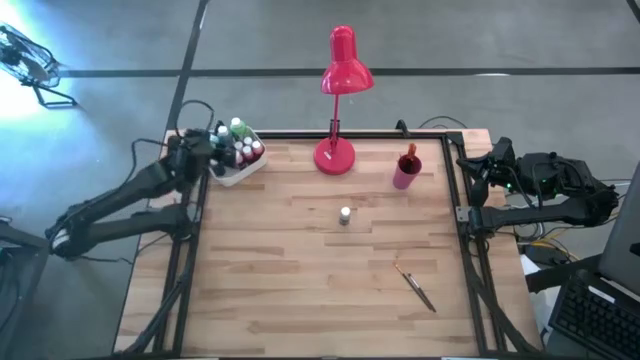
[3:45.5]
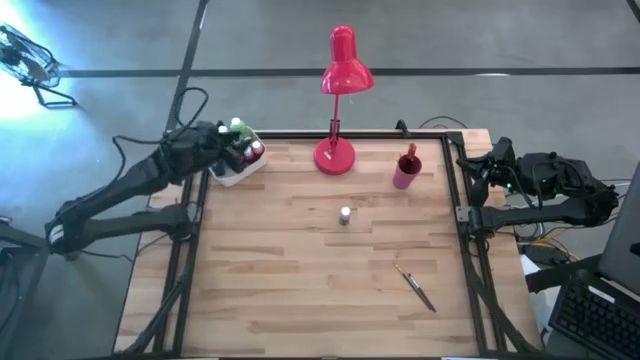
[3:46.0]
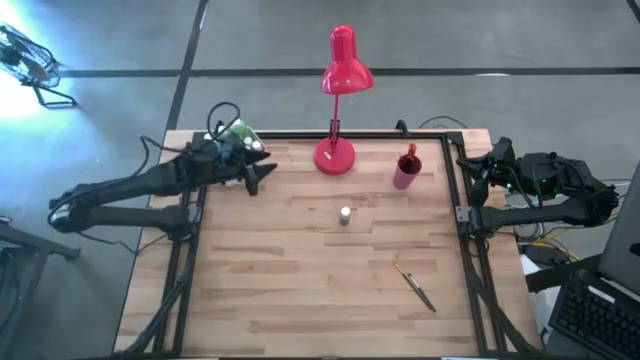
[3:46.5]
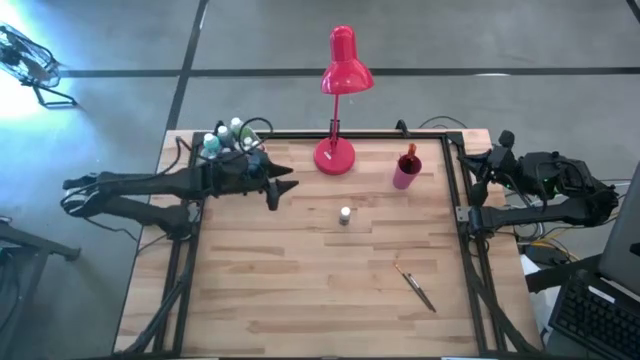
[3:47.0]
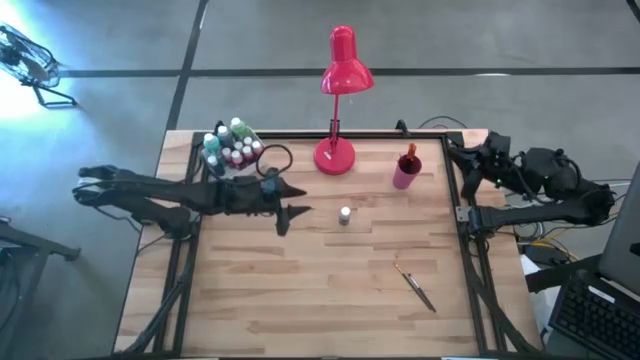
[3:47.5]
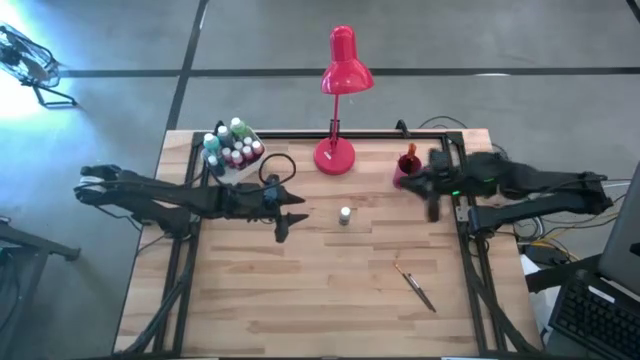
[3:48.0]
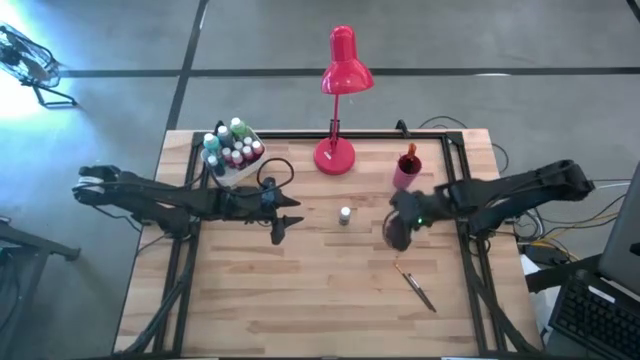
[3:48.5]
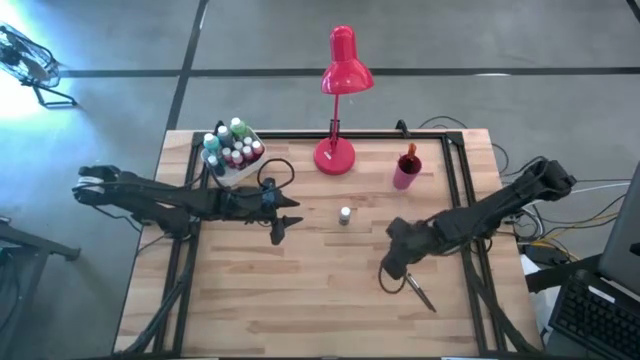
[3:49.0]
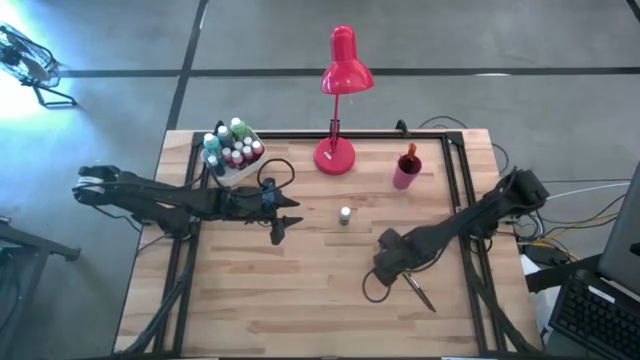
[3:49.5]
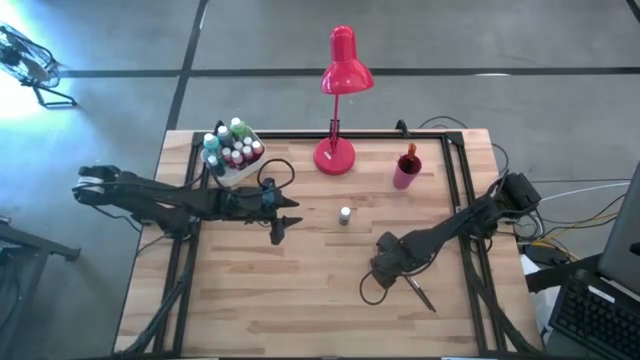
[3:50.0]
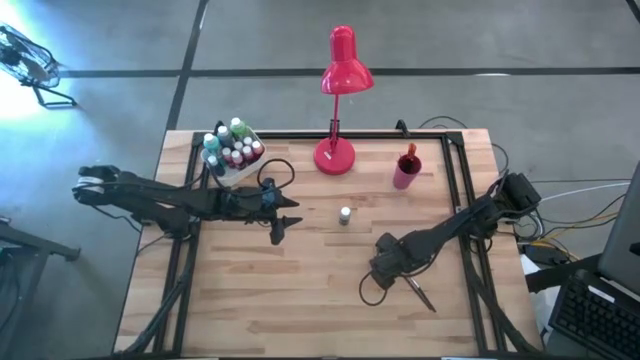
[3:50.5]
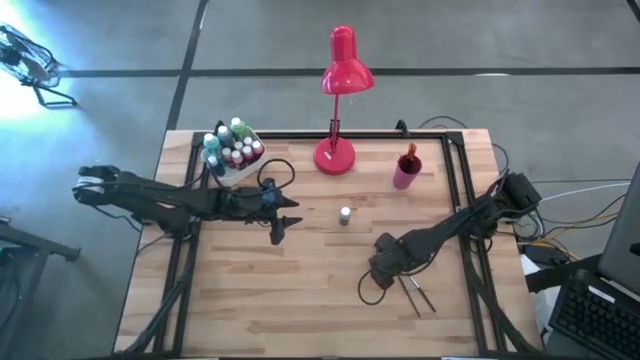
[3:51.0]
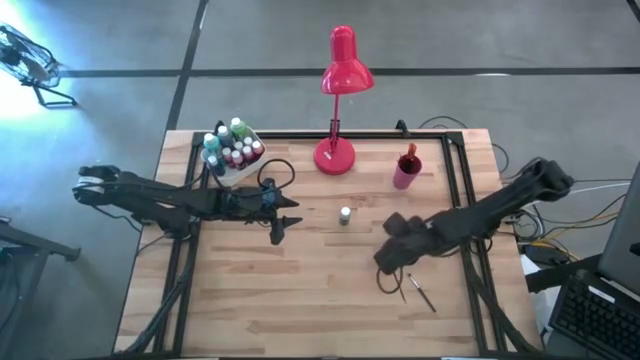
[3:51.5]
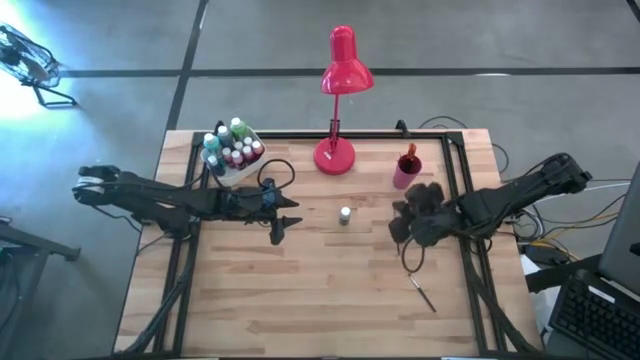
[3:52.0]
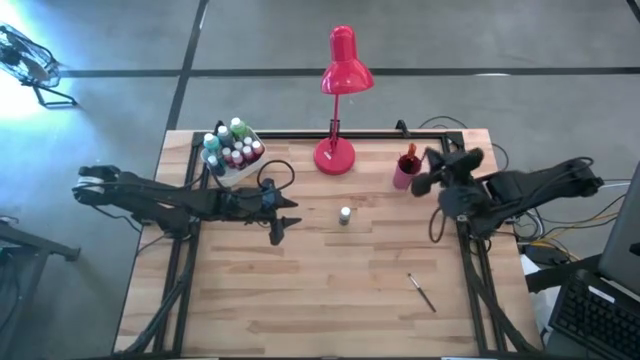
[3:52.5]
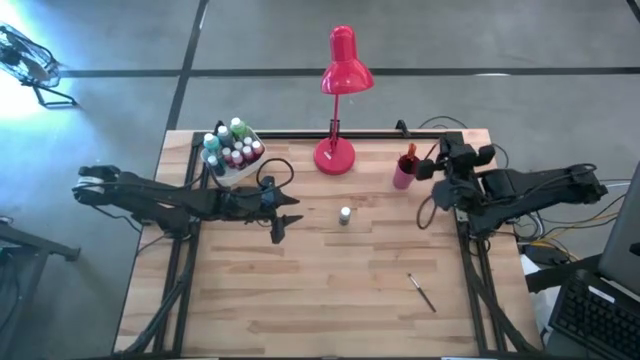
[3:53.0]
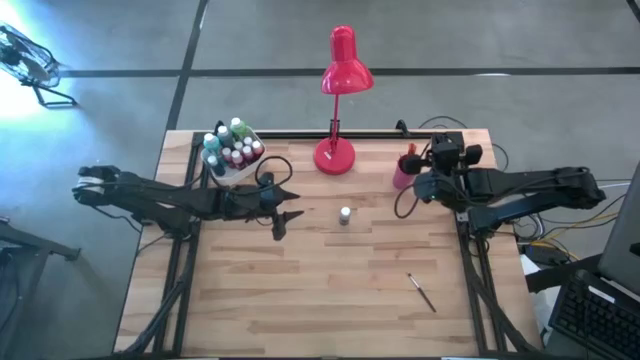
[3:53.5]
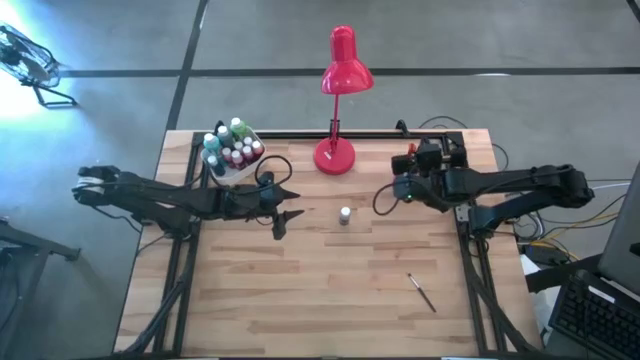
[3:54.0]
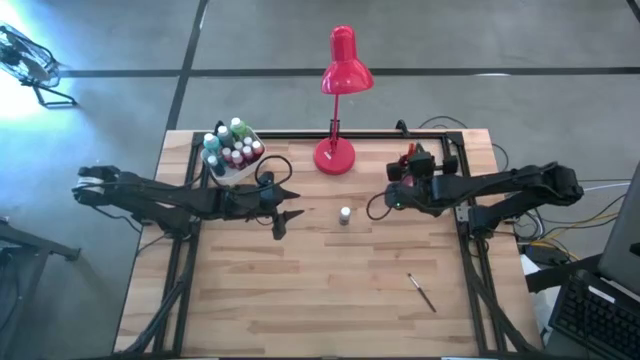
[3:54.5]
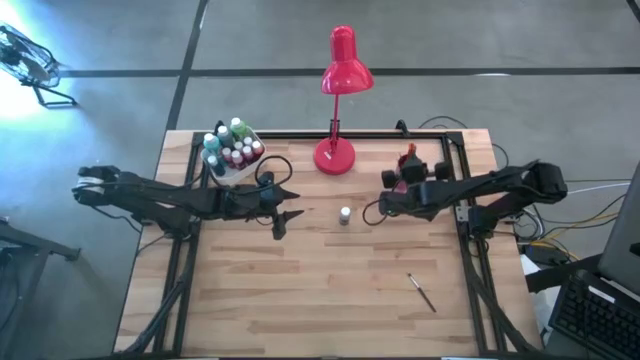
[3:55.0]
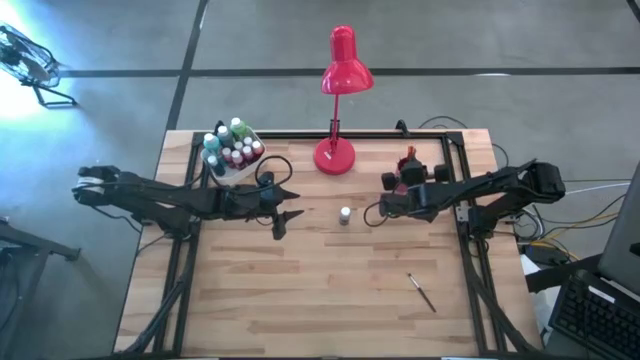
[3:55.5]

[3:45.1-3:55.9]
Task: Pick & Place Paint Supplies
Put the gold paintbrush into the pink cup

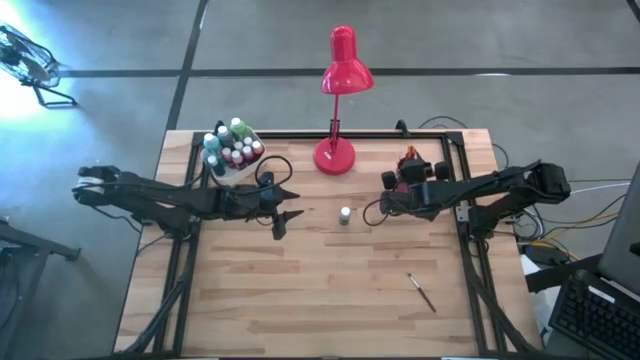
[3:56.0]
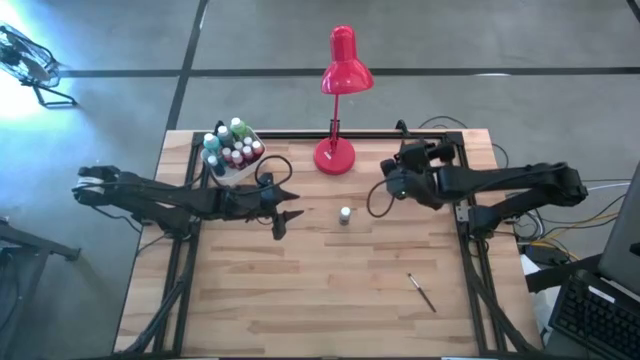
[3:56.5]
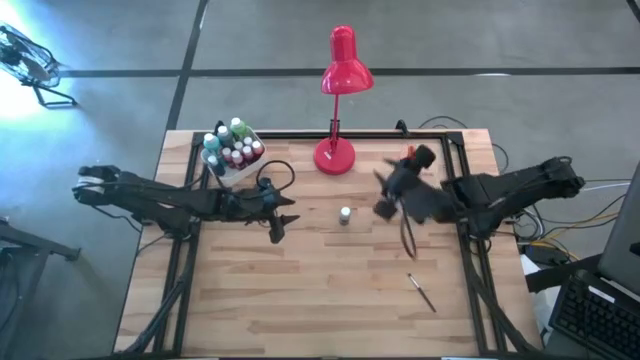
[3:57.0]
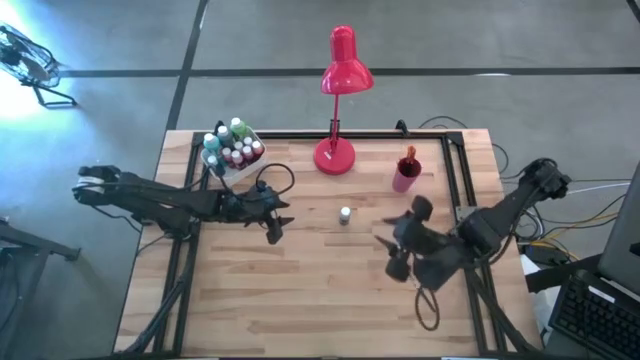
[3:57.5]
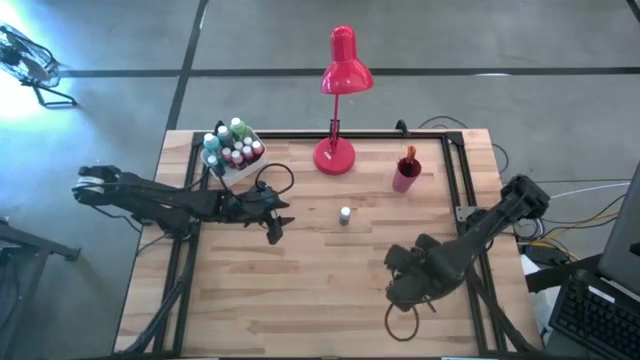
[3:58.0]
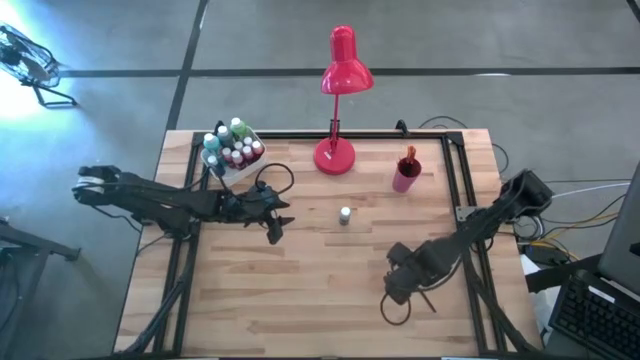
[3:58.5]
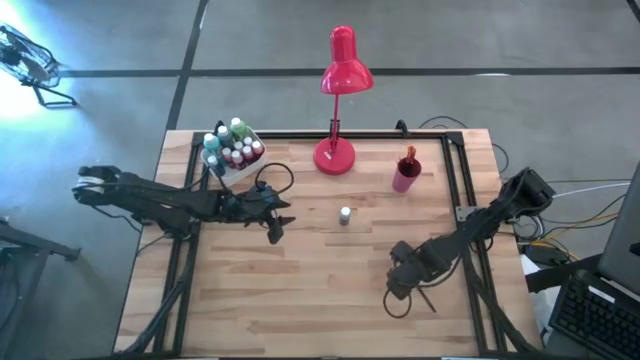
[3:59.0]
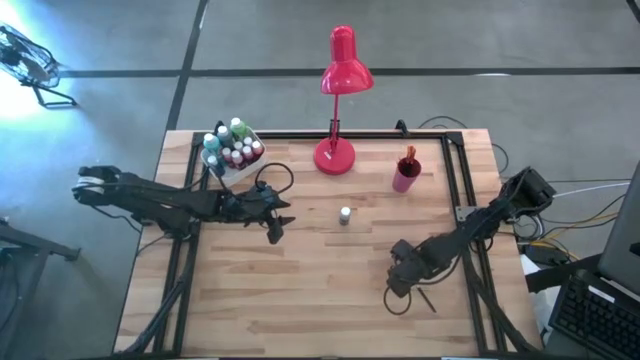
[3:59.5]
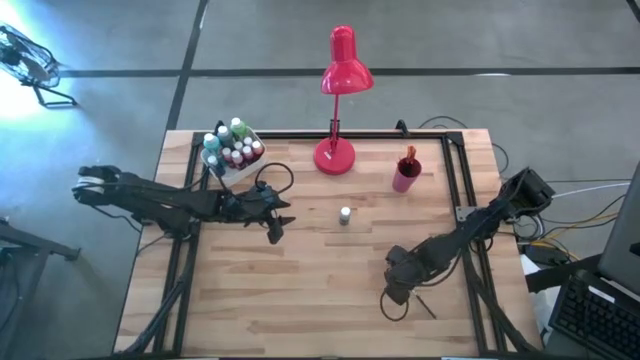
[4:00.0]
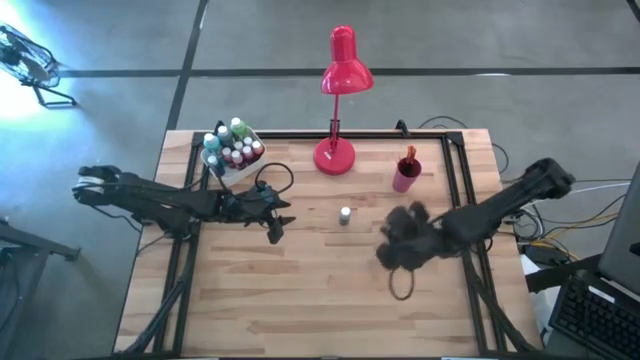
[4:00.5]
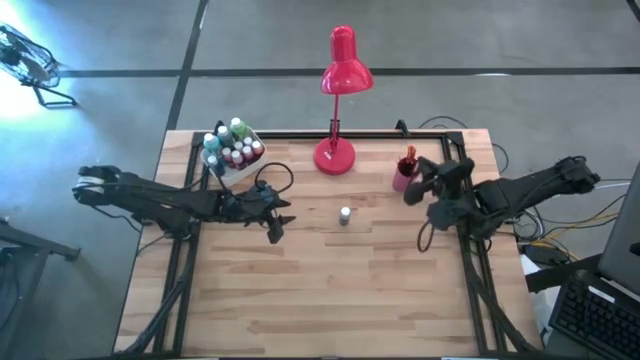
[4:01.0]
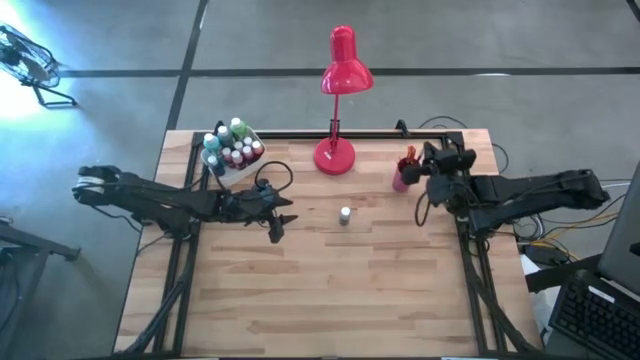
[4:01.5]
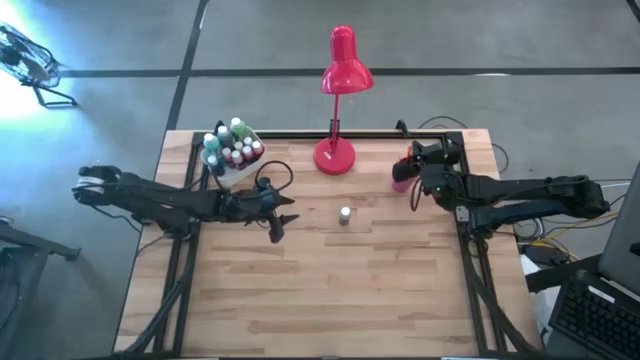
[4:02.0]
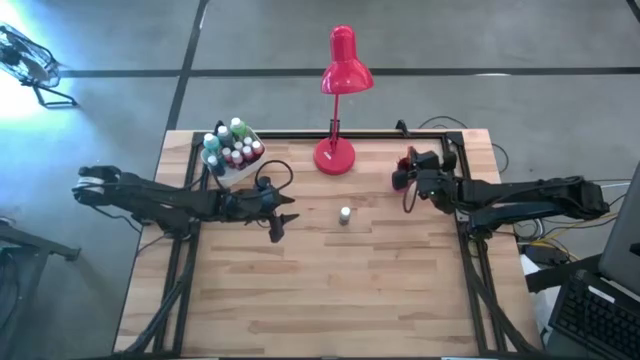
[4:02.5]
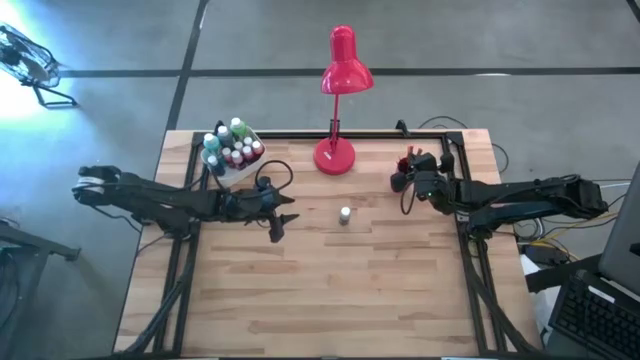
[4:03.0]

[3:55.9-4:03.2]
Put the silver paintbrush into the pink cup
